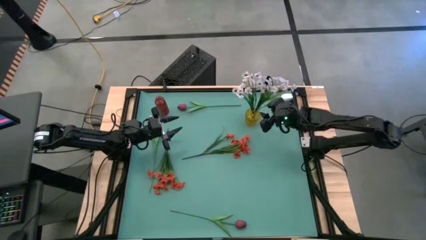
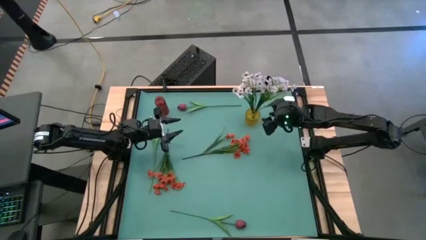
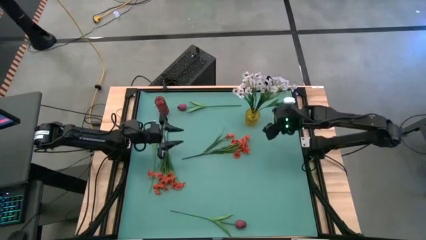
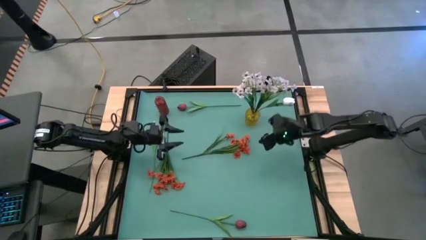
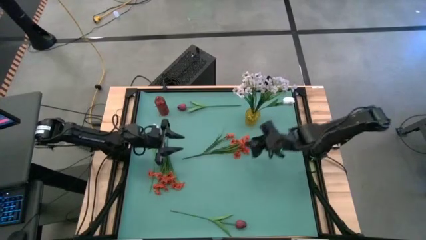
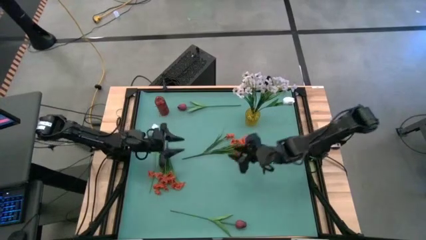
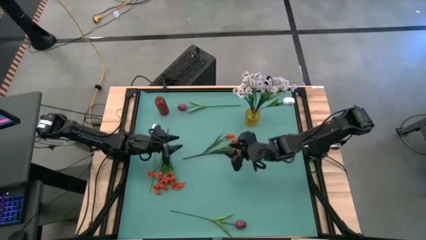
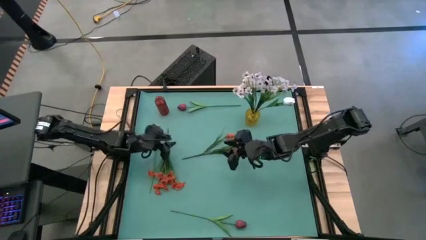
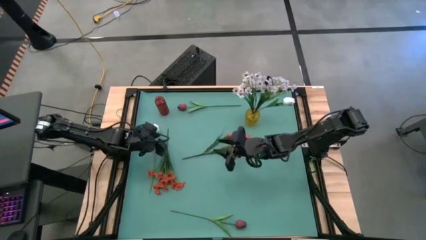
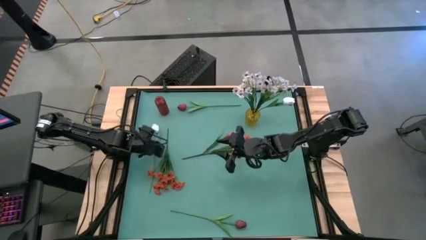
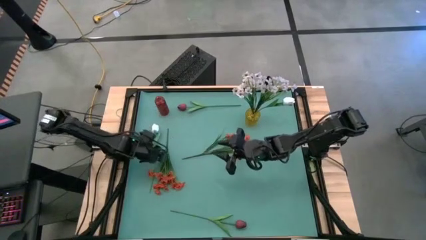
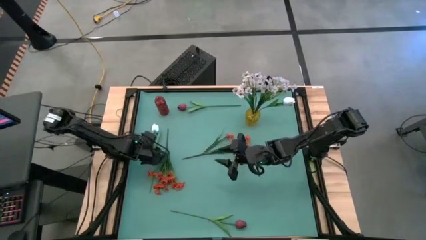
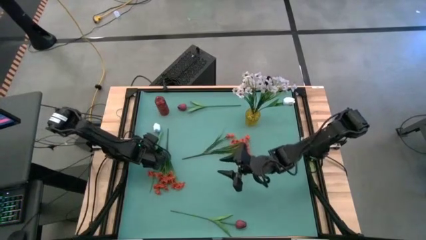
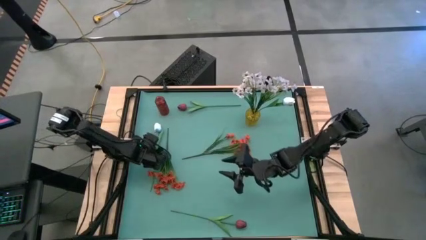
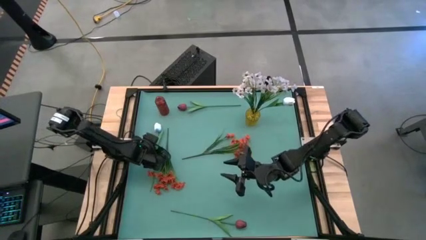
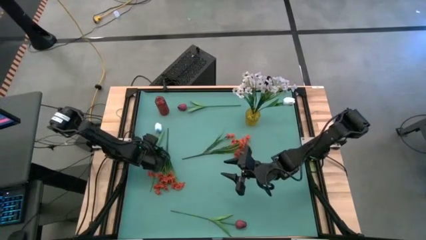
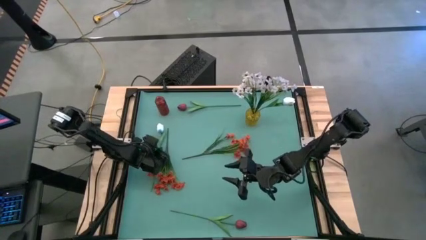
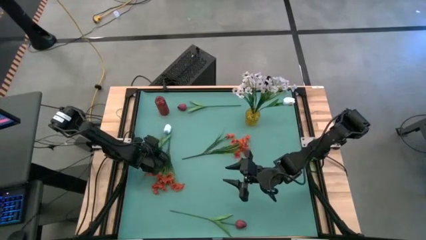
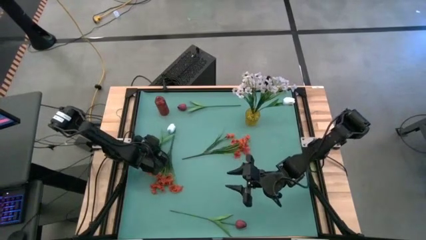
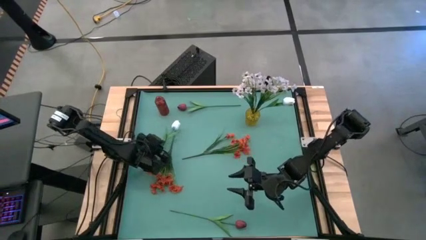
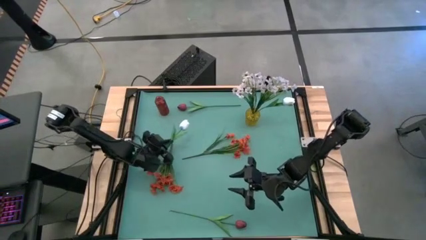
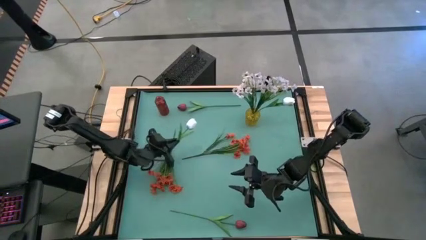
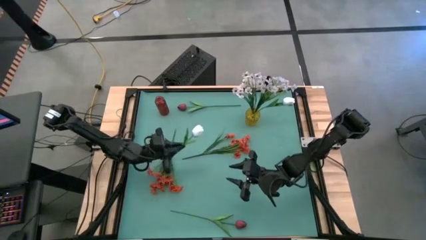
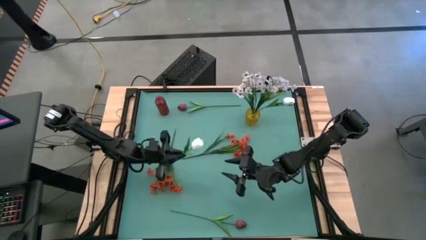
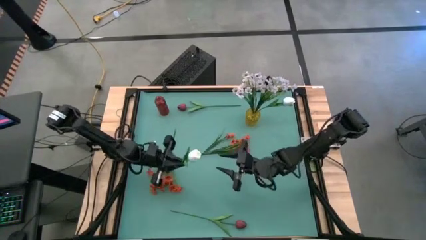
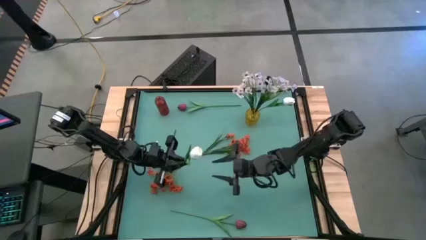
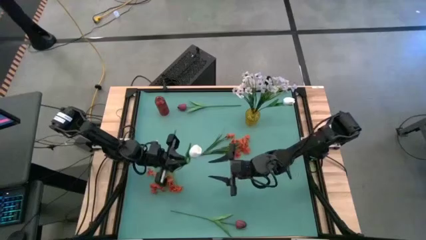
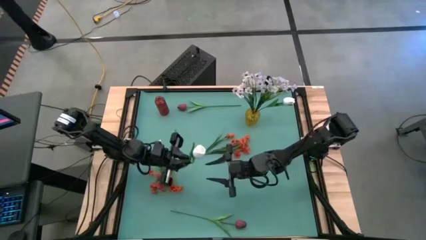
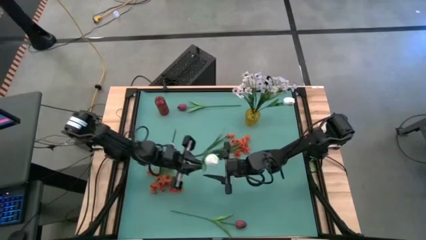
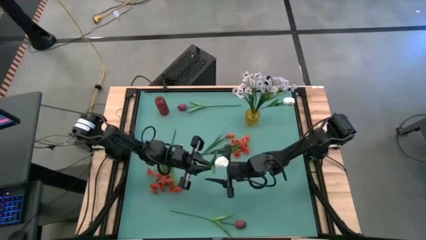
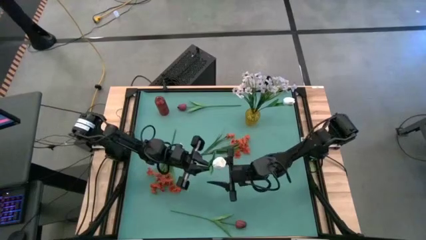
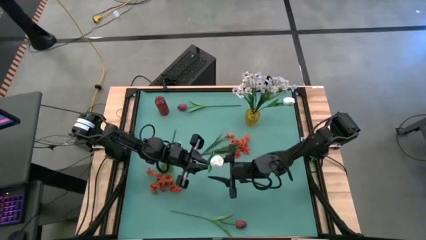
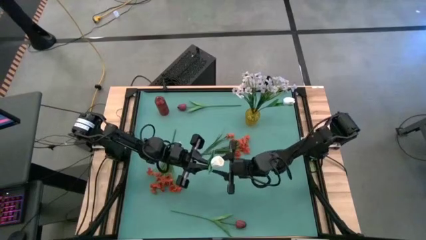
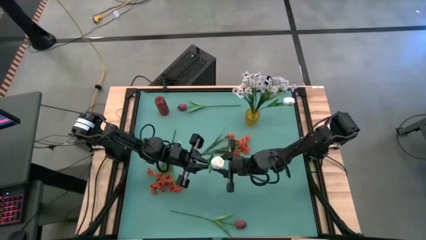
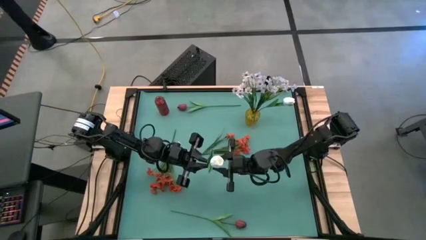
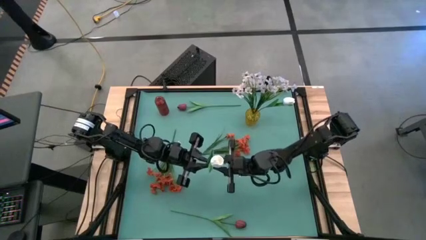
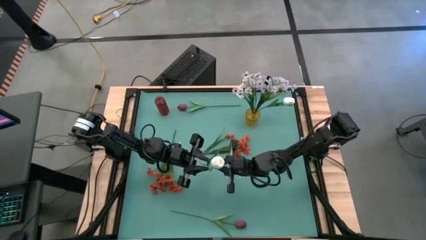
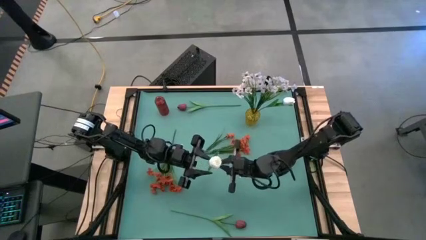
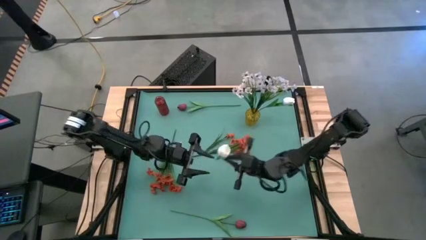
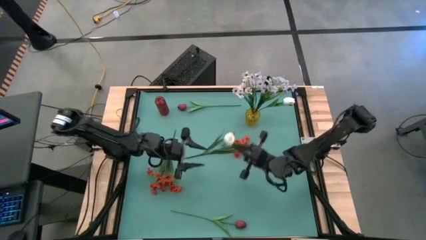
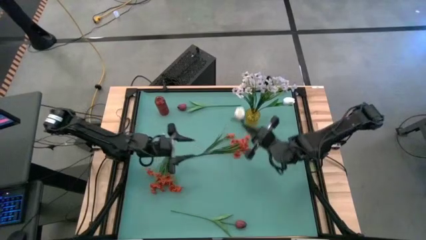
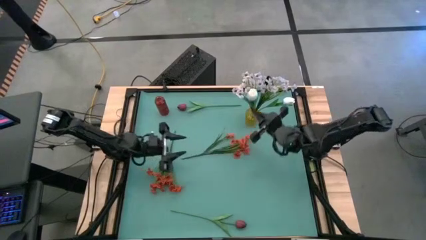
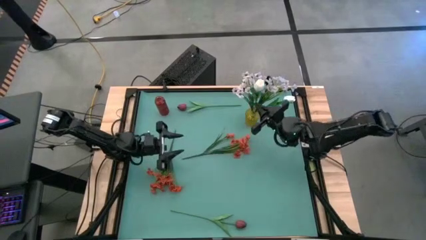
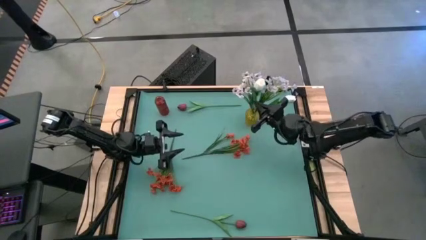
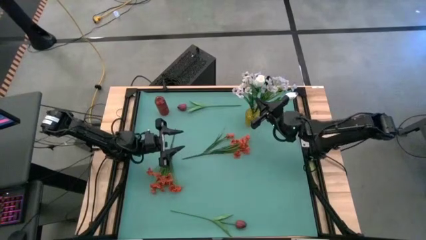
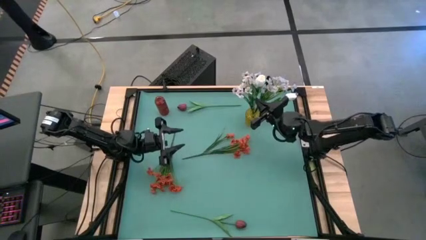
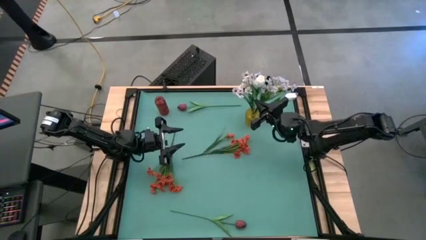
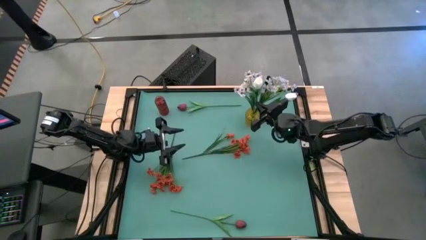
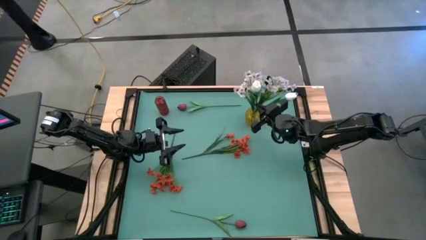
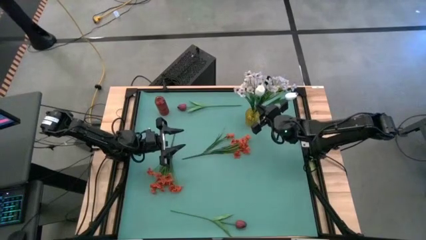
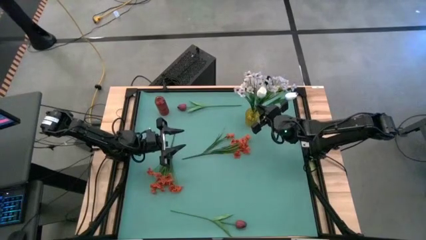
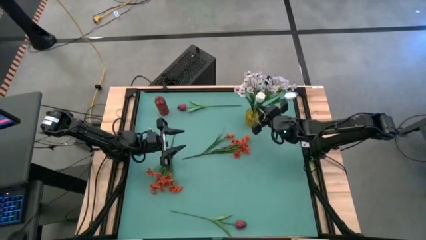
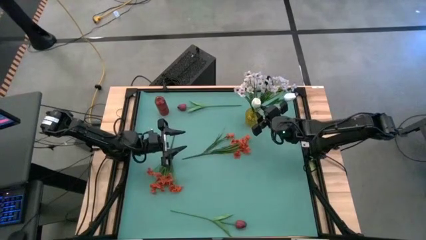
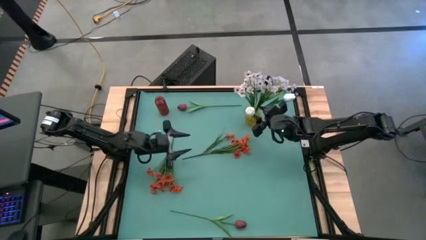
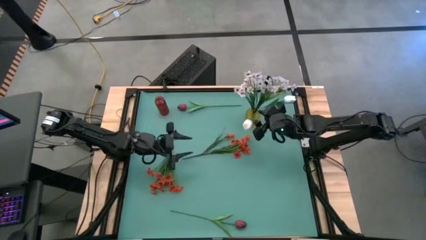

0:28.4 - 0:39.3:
Task: Sort flowers into vase by color
Put the white tulip flower into the yellow flower vase

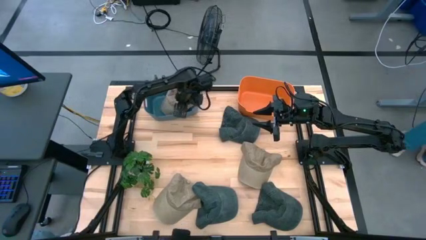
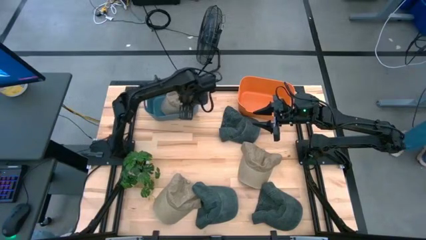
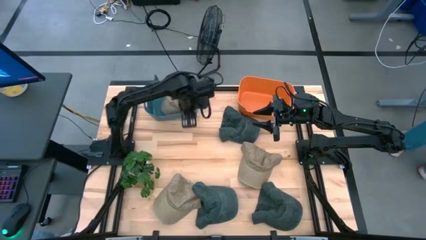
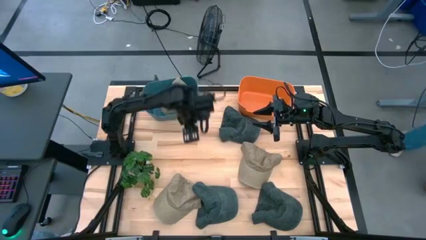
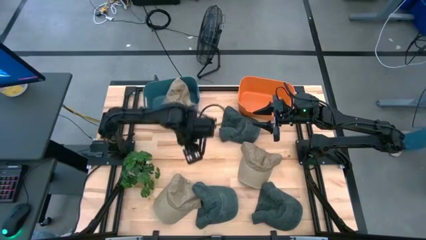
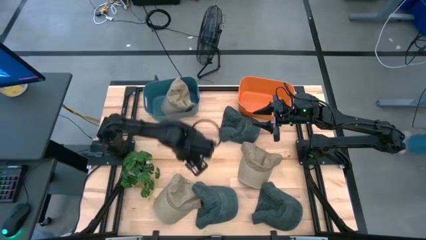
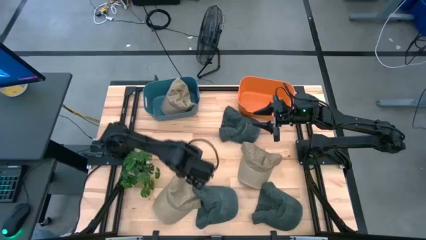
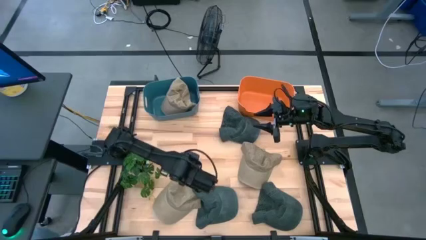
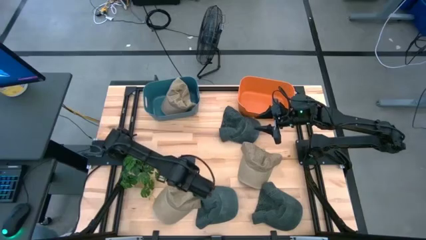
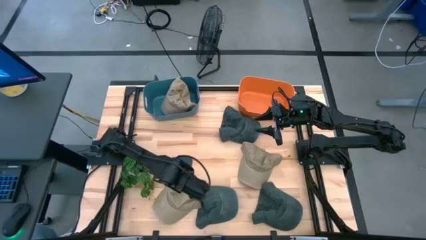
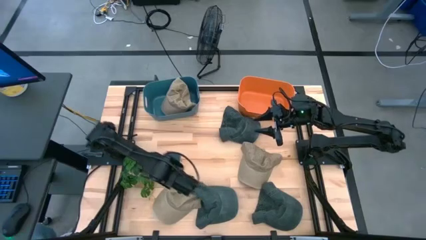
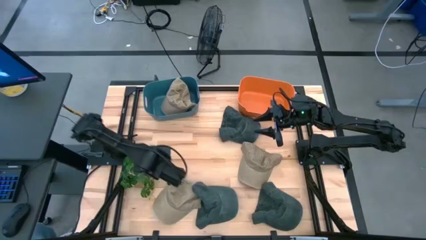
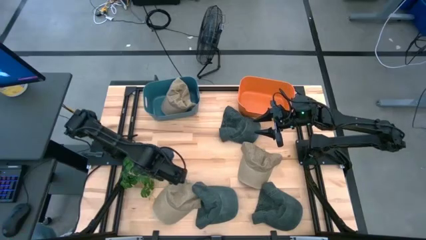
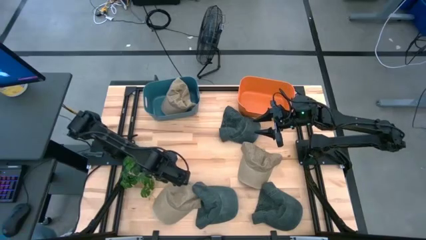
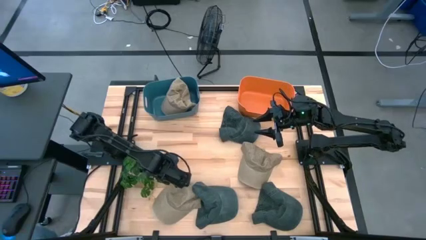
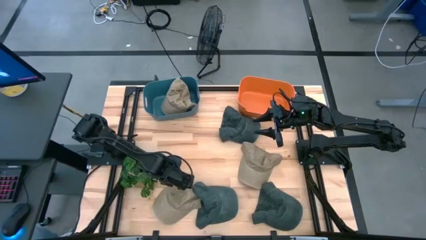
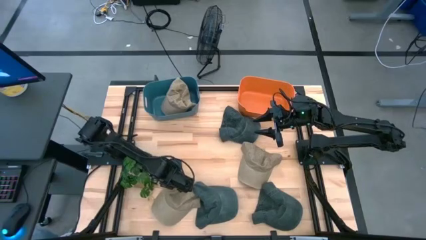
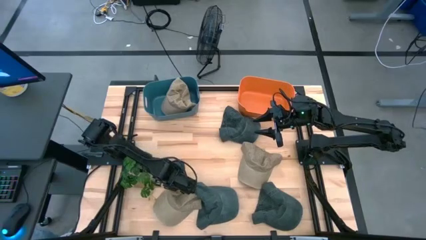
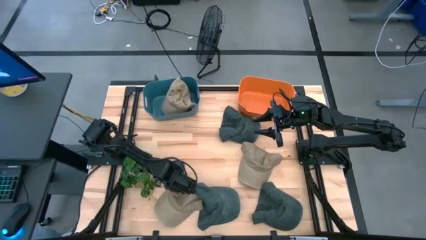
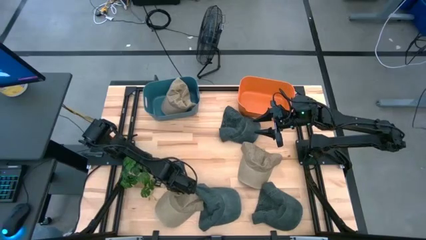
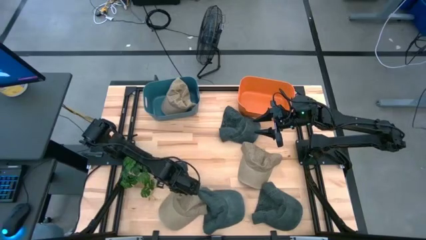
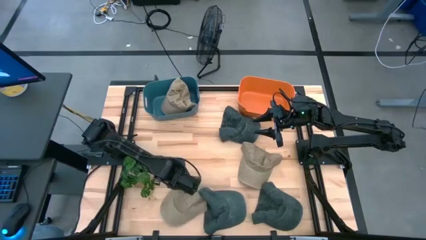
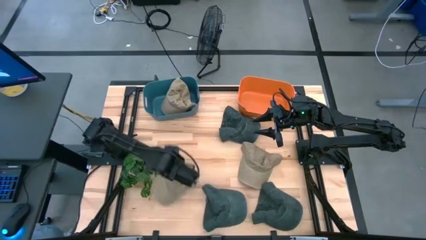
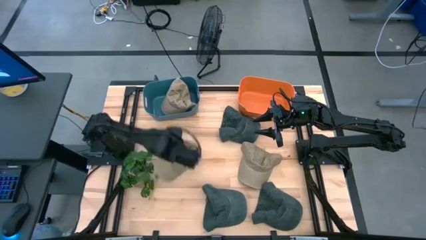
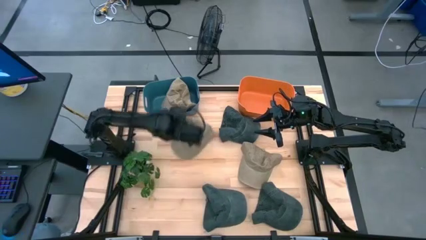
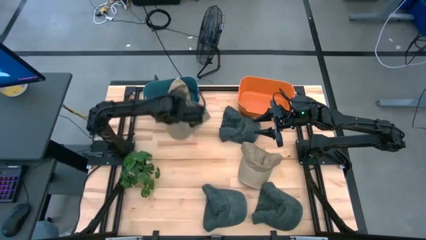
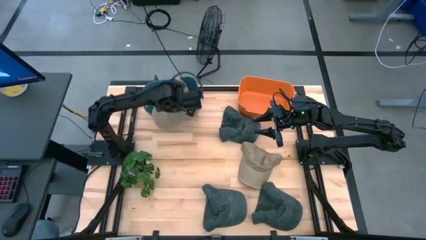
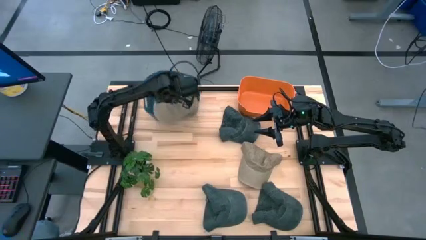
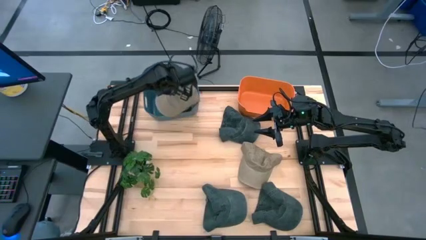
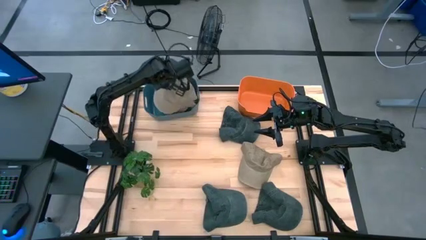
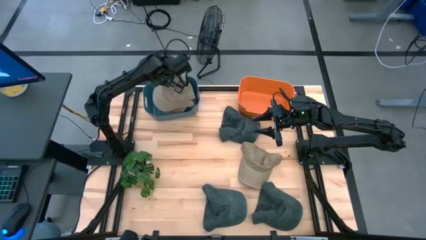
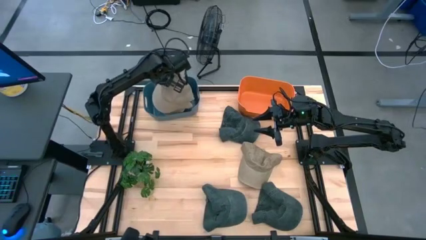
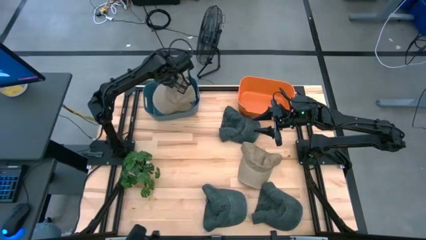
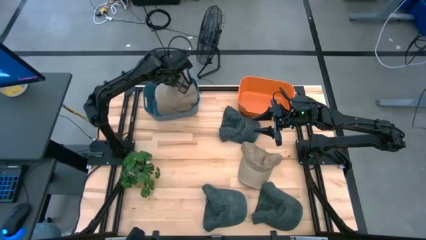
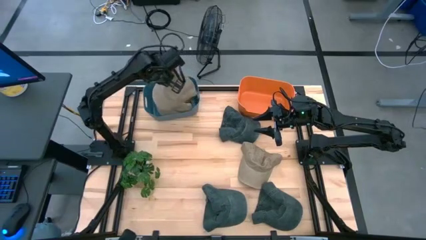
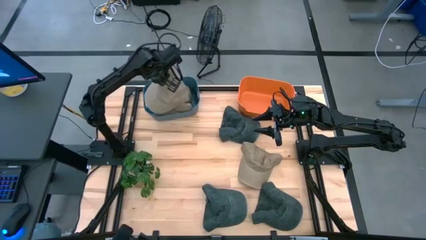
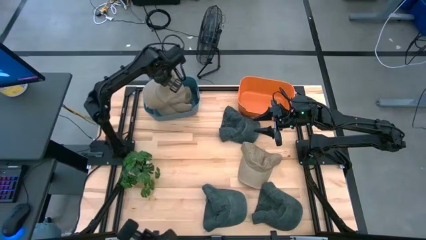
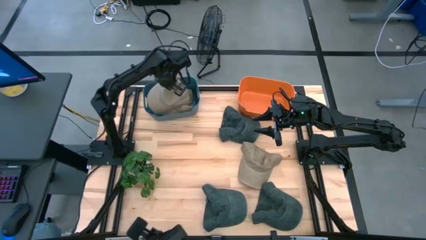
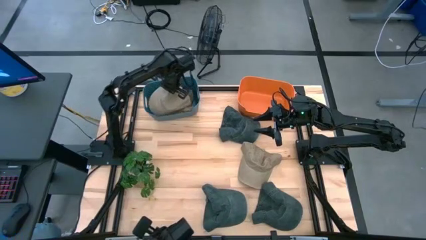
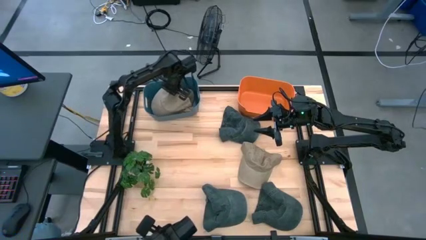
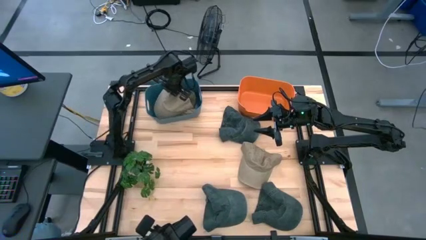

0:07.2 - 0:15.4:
Task: Pick & Place hat
Put the left brown cap into the blue bin
